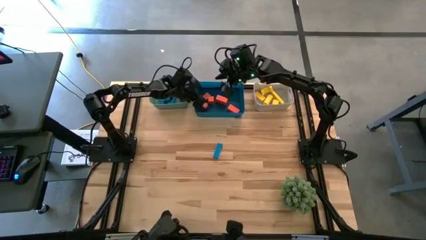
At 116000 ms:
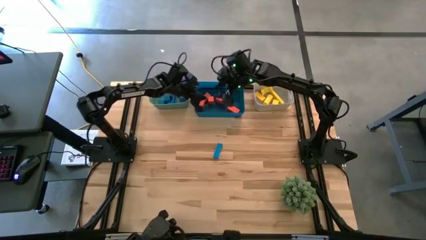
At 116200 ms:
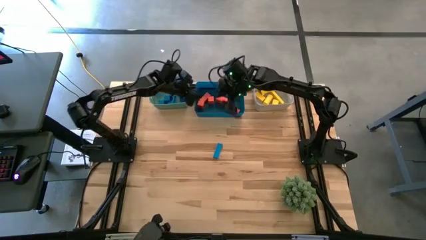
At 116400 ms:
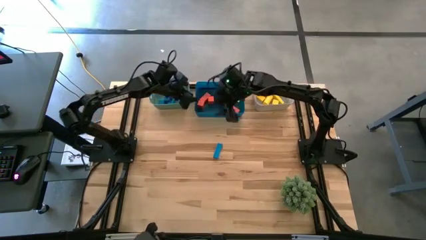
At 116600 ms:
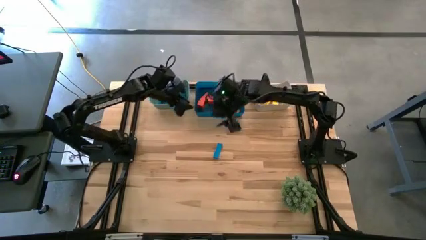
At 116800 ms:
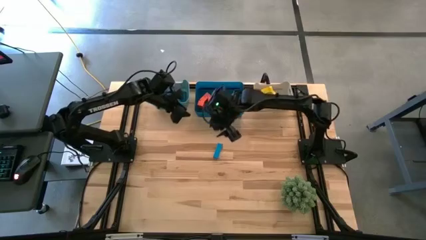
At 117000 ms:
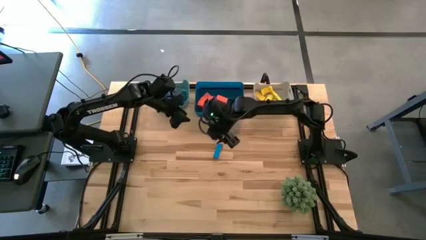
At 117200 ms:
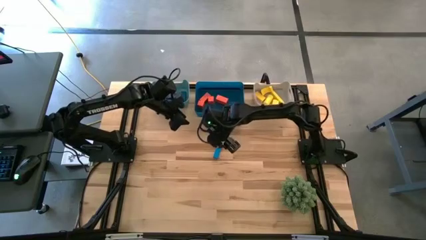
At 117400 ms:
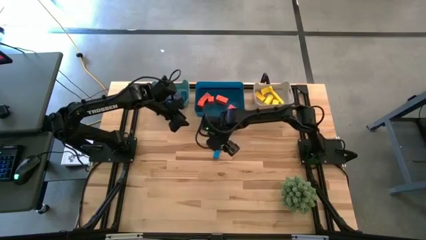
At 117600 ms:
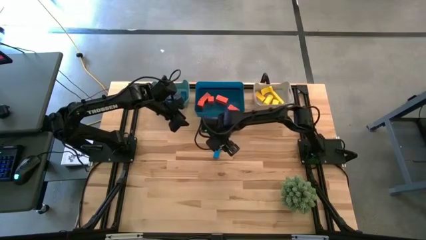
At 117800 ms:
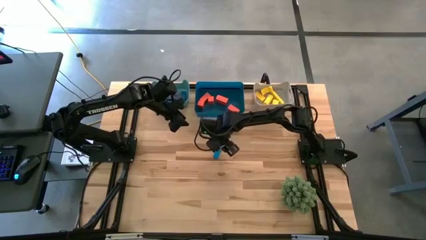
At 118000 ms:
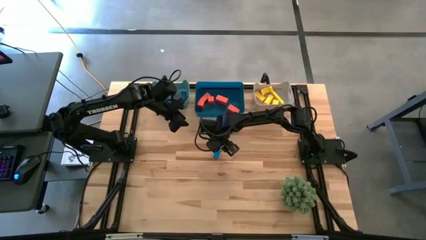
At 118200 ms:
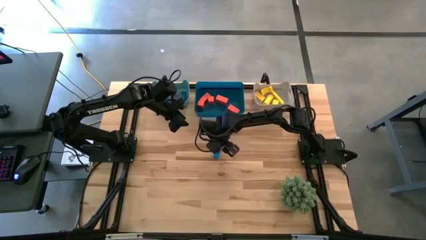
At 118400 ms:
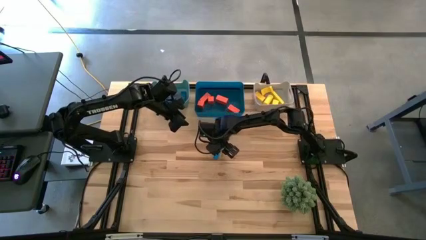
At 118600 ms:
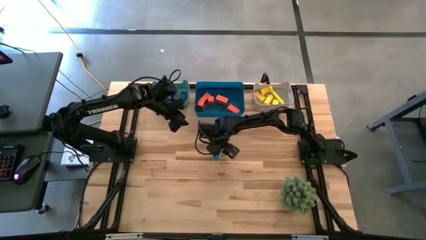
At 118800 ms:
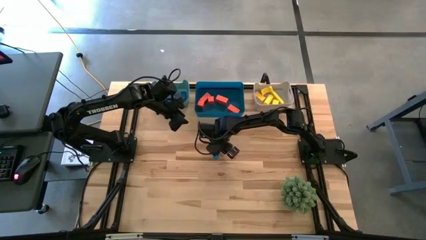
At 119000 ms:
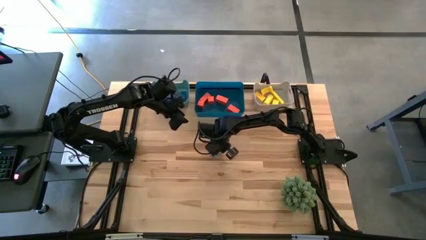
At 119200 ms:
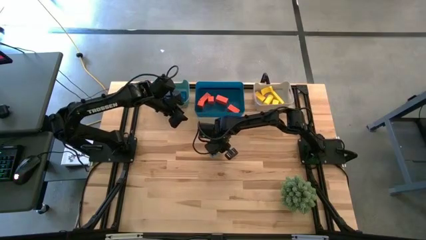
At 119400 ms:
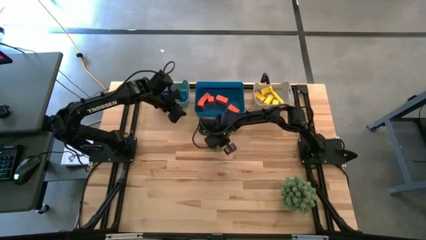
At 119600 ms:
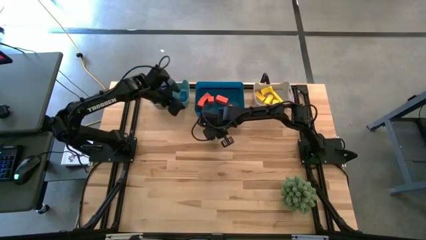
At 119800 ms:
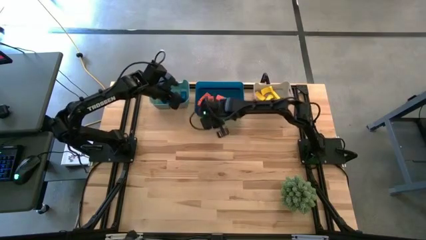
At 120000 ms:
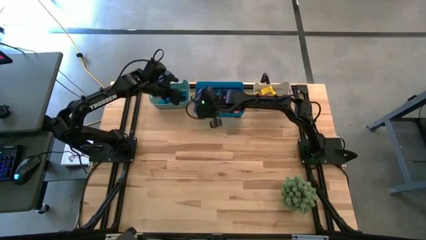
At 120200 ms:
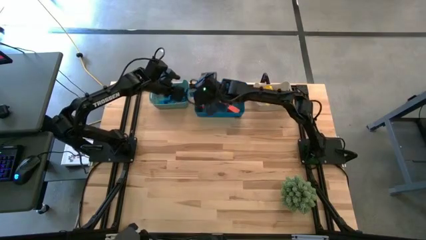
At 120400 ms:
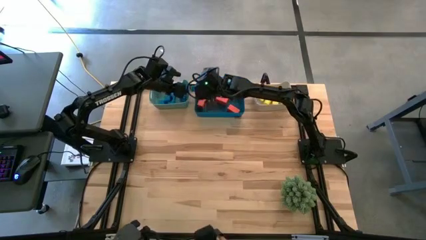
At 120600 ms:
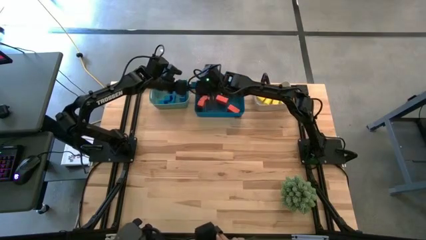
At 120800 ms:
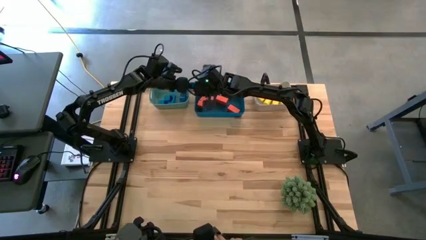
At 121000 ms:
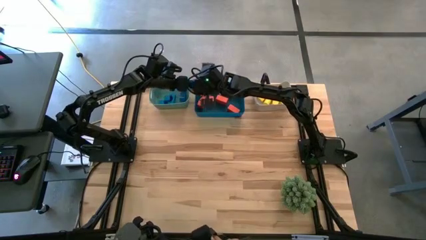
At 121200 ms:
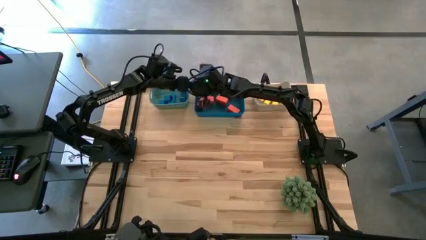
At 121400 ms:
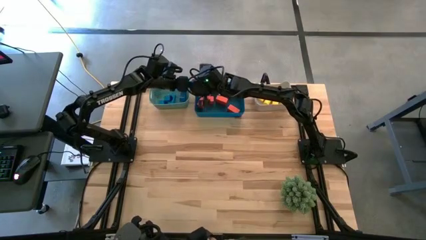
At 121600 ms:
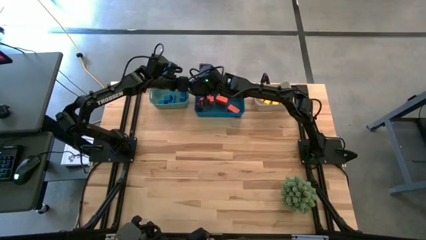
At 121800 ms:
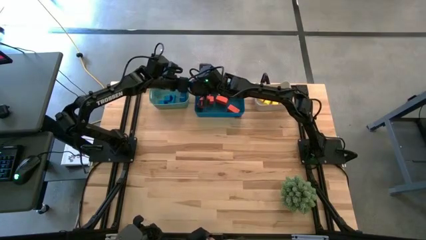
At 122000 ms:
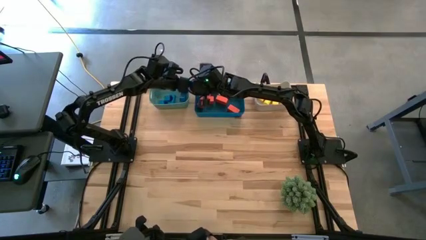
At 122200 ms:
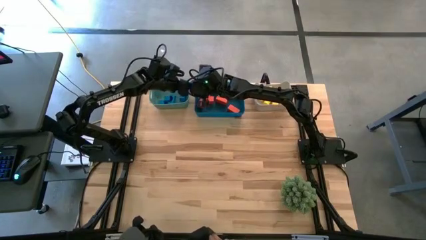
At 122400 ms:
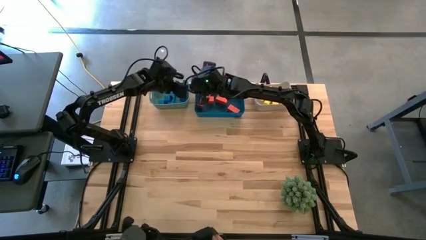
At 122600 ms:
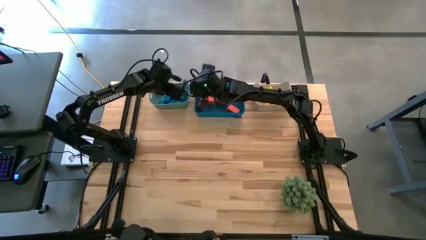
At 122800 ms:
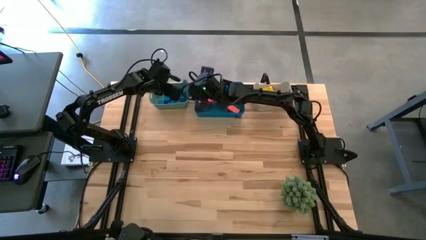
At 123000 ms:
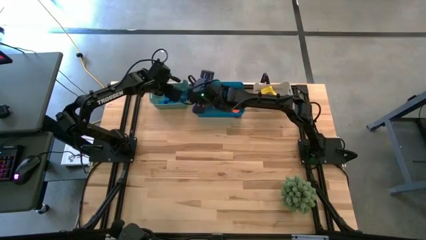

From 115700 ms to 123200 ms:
Task: Sort & place blocks by color
Put the blue block into the green bin

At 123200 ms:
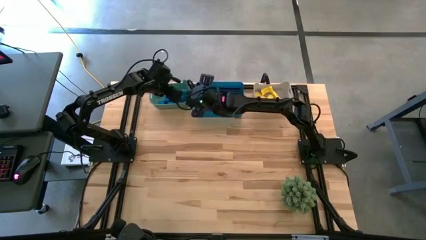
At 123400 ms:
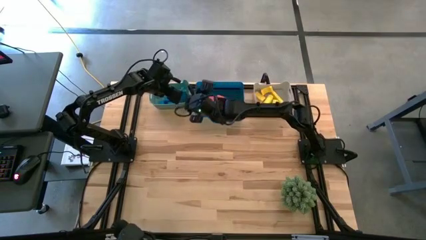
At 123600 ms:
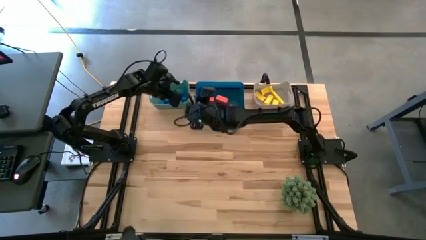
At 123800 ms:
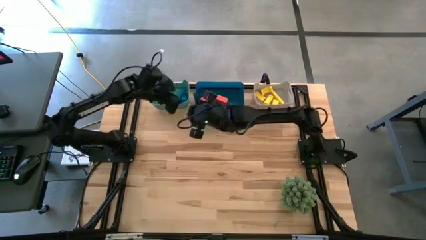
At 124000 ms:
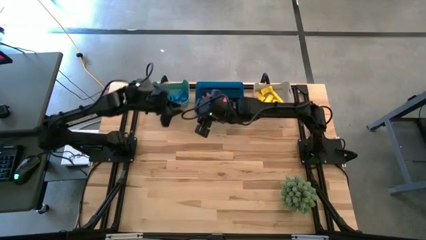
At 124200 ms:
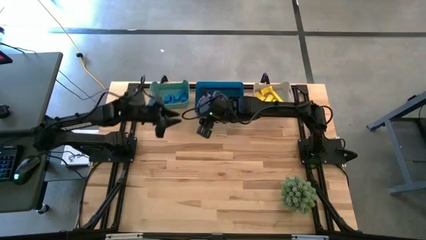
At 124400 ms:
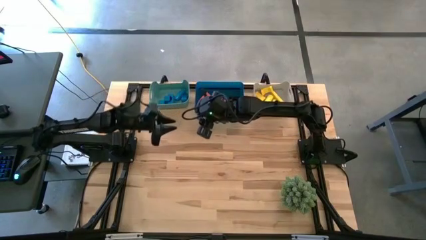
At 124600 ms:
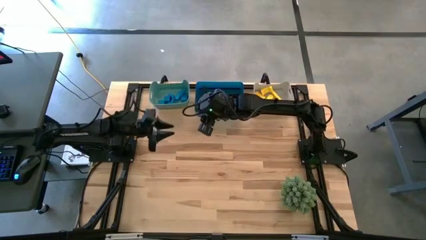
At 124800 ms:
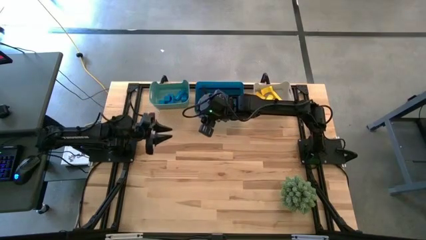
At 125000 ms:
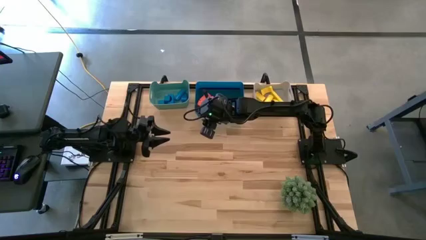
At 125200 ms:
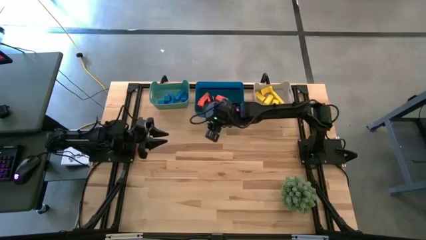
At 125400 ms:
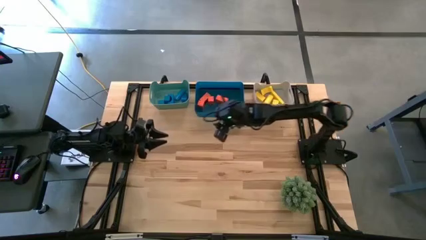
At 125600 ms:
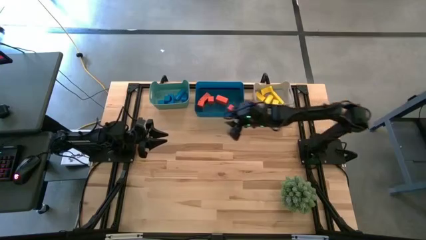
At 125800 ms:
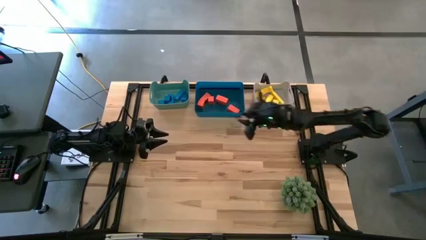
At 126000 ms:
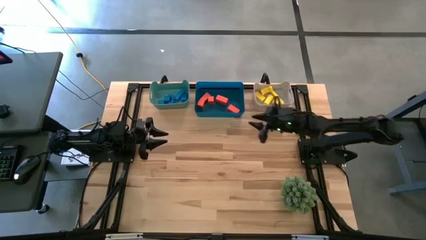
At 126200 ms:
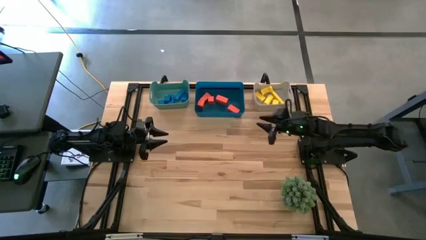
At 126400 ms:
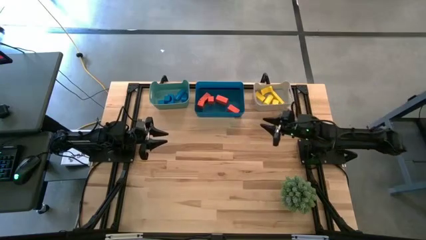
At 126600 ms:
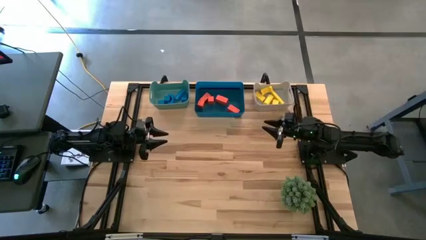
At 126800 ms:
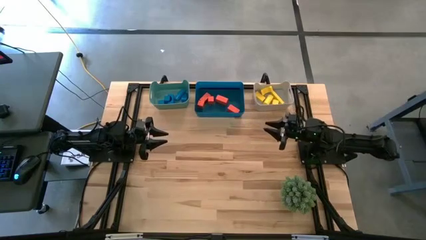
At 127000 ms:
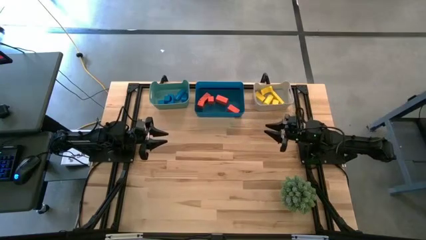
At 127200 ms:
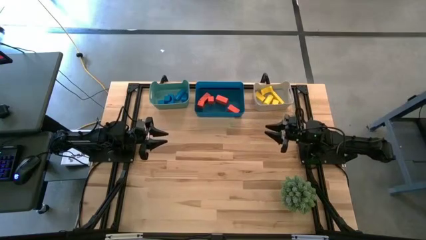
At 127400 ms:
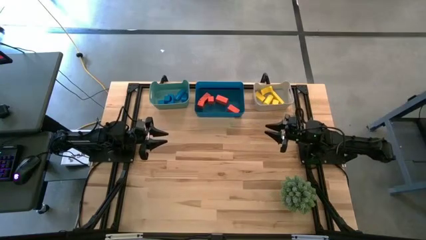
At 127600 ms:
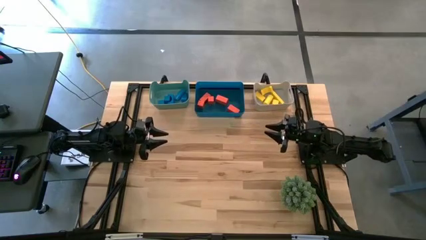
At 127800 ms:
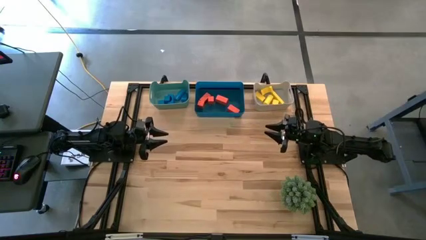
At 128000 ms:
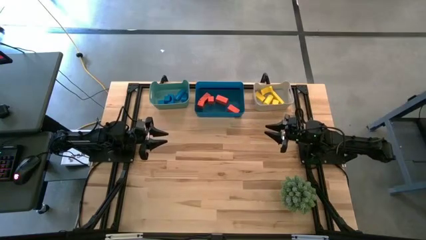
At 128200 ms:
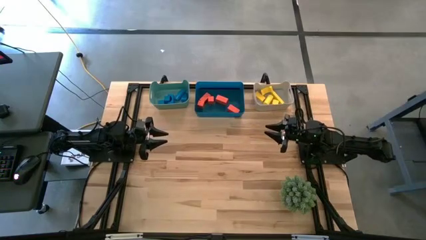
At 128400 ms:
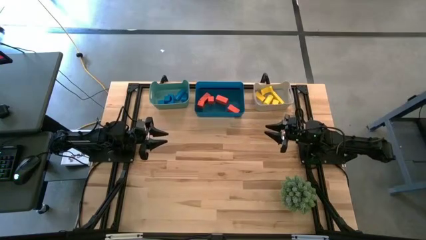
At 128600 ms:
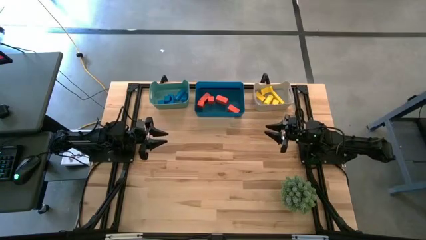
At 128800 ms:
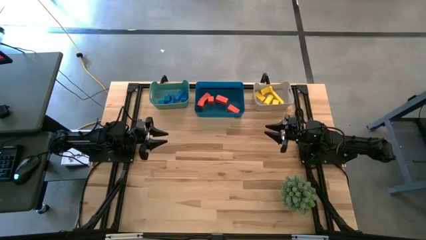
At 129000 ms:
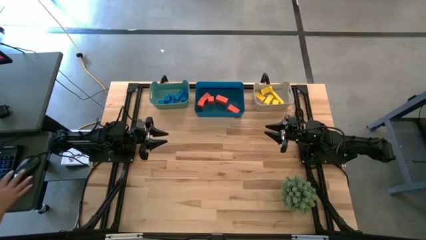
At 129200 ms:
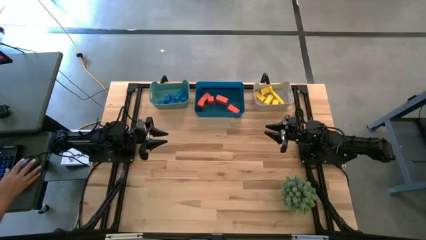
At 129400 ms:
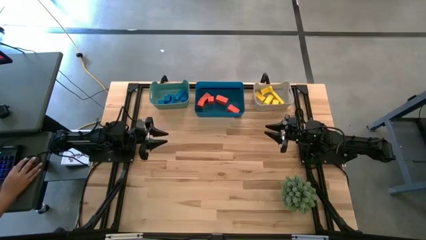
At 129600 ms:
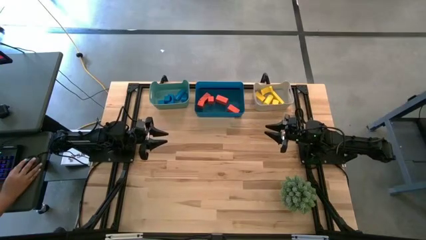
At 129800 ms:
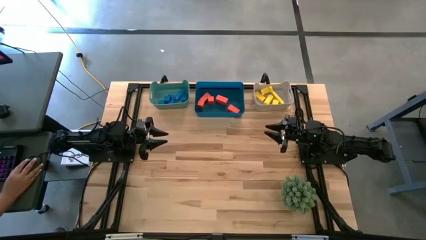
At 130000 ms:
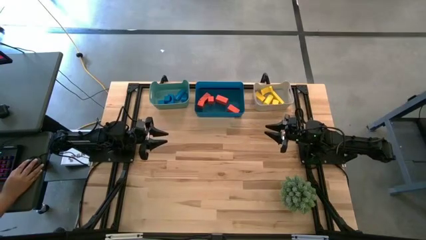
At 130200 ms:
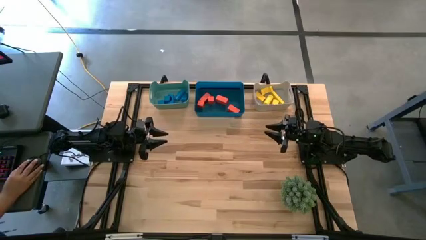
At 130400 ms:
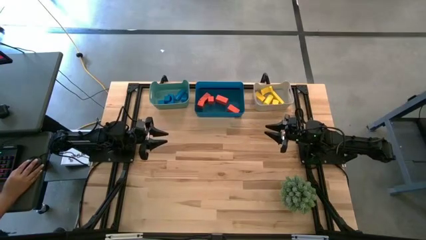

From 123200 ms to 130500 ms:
Return to Home Position
